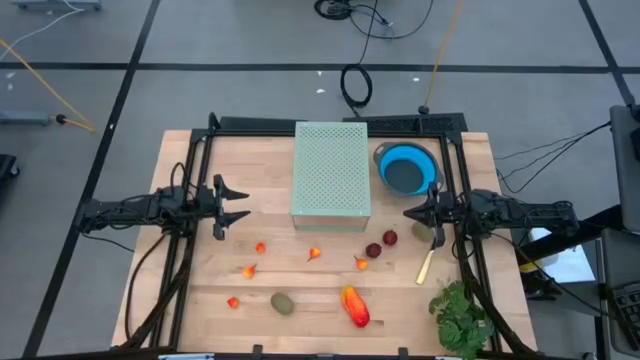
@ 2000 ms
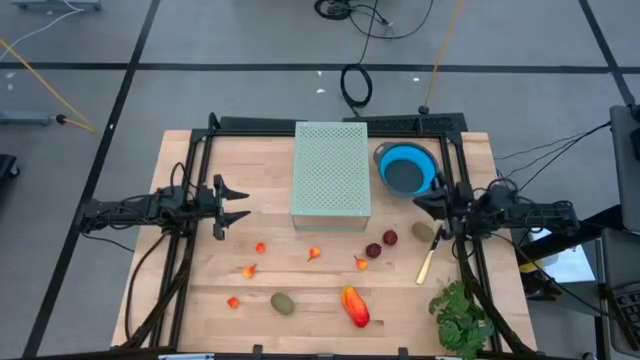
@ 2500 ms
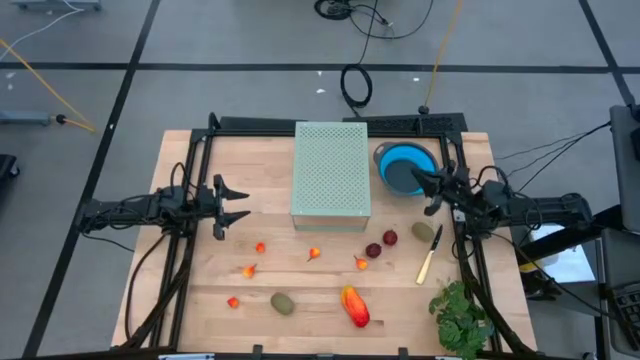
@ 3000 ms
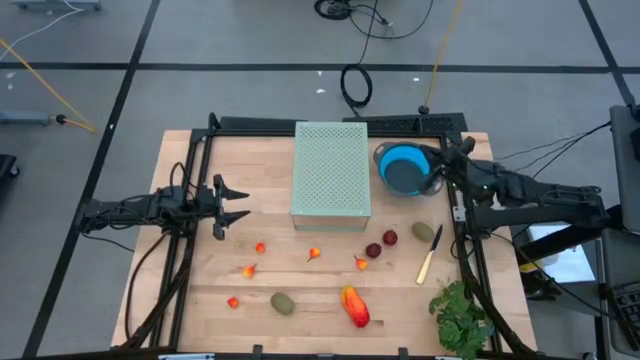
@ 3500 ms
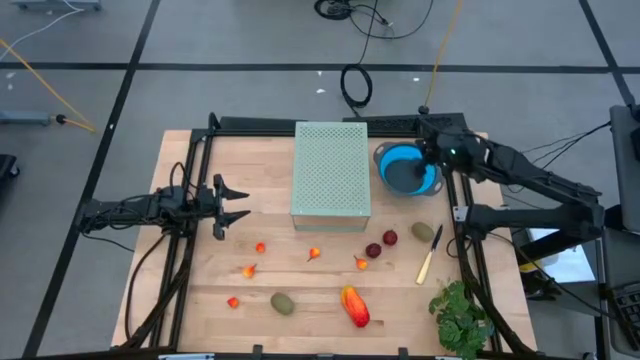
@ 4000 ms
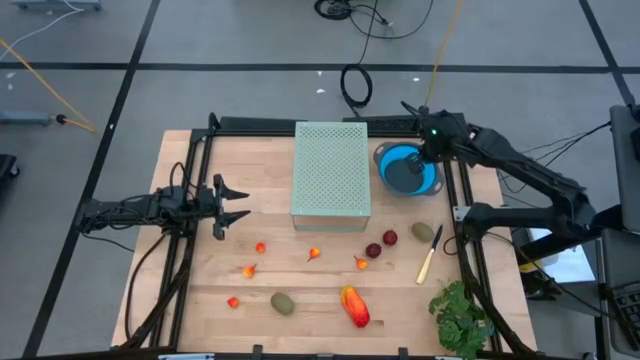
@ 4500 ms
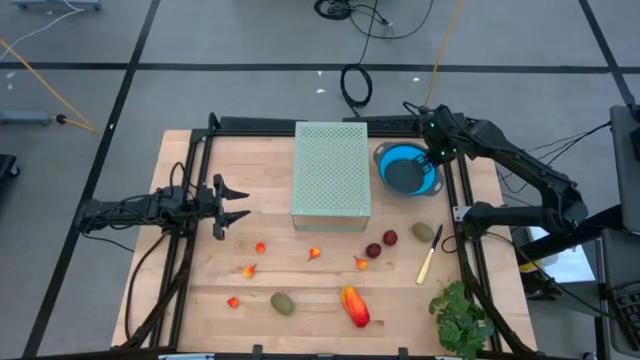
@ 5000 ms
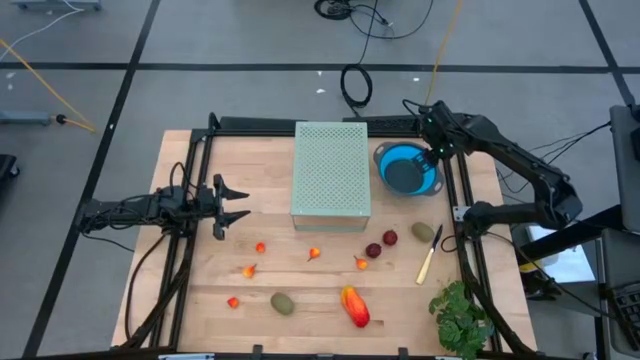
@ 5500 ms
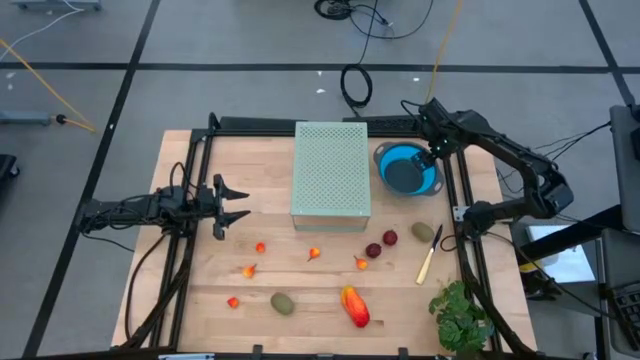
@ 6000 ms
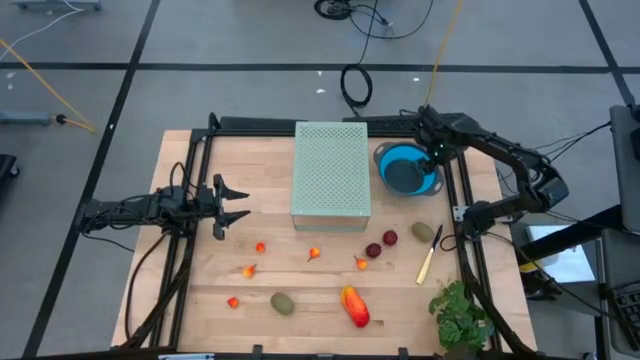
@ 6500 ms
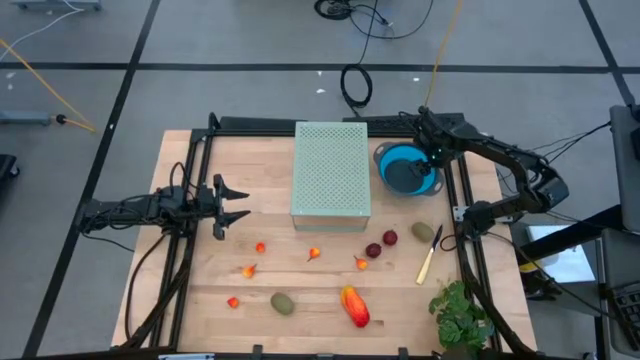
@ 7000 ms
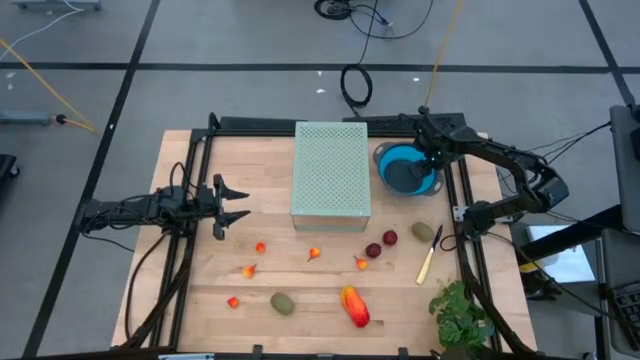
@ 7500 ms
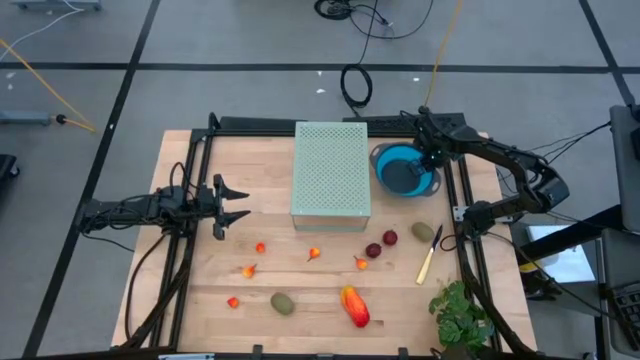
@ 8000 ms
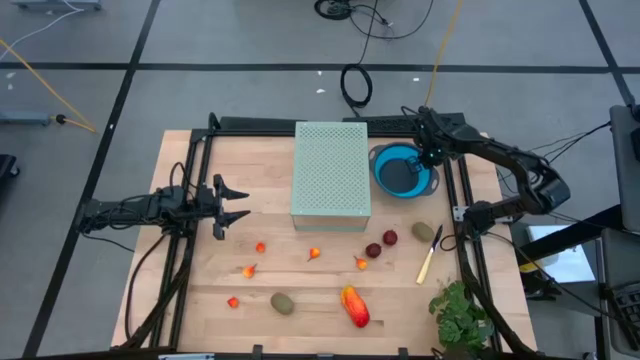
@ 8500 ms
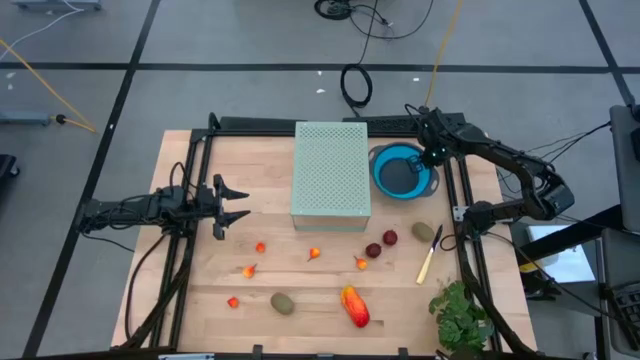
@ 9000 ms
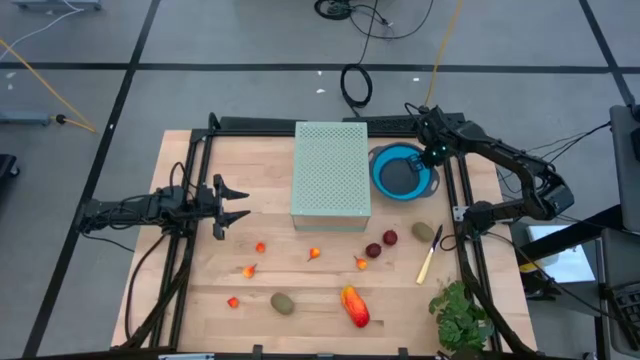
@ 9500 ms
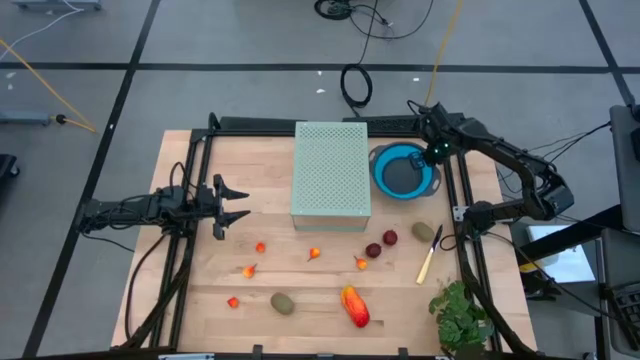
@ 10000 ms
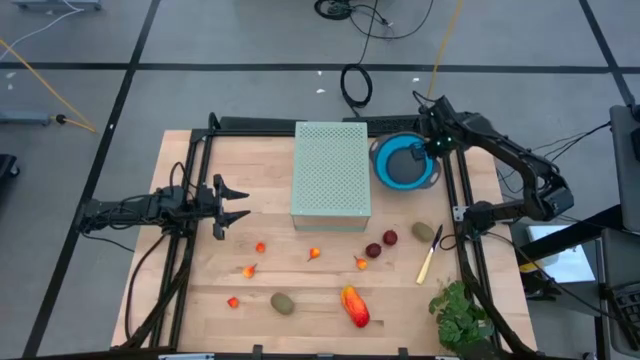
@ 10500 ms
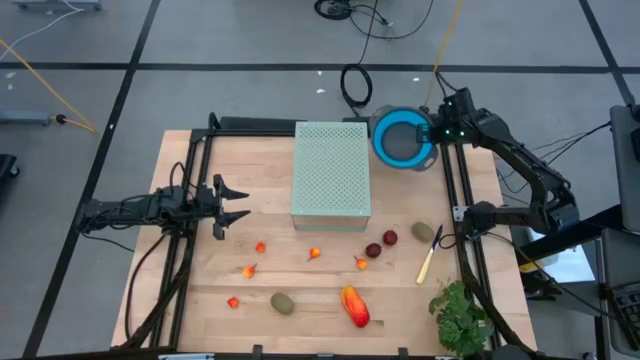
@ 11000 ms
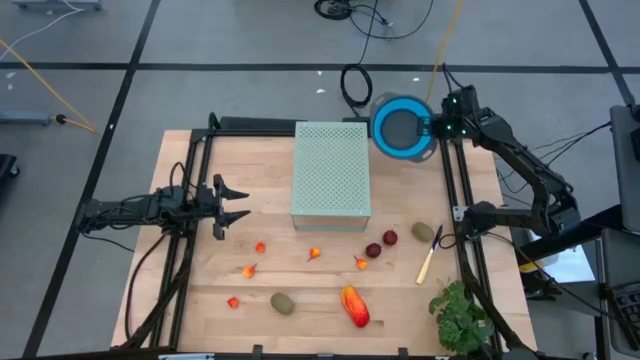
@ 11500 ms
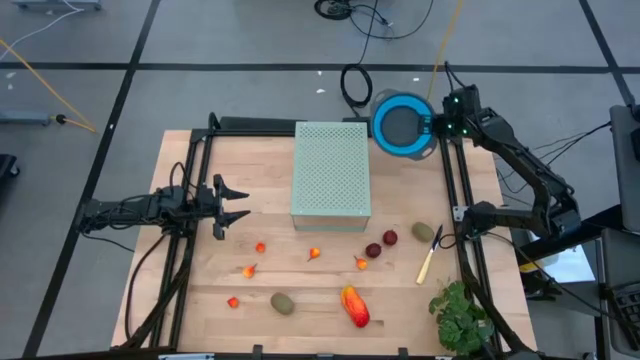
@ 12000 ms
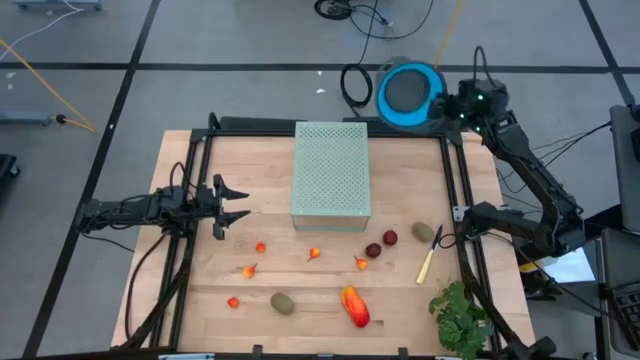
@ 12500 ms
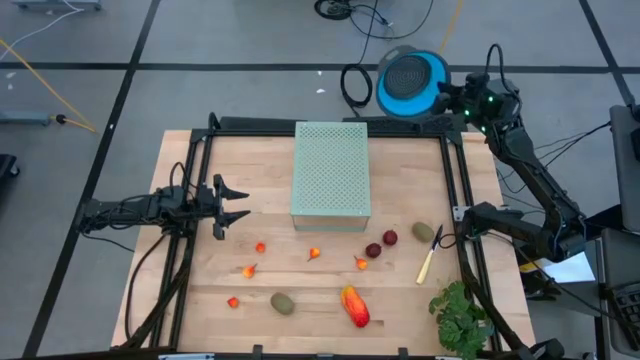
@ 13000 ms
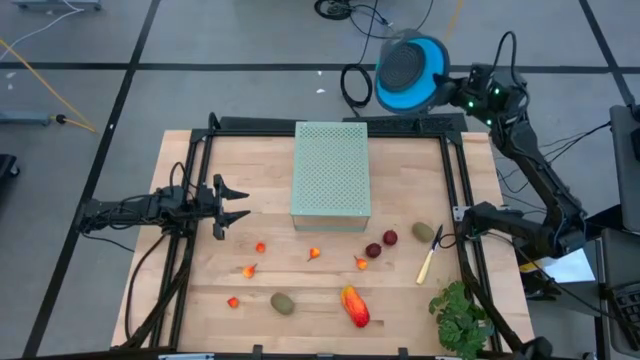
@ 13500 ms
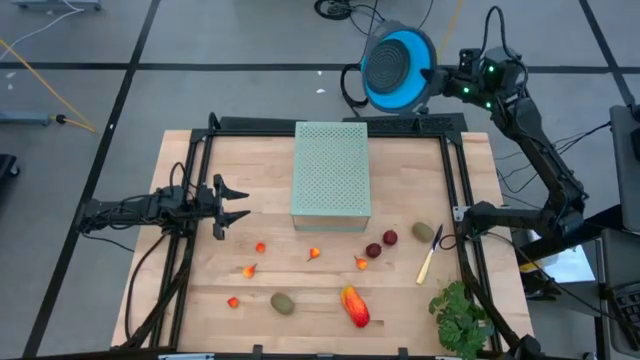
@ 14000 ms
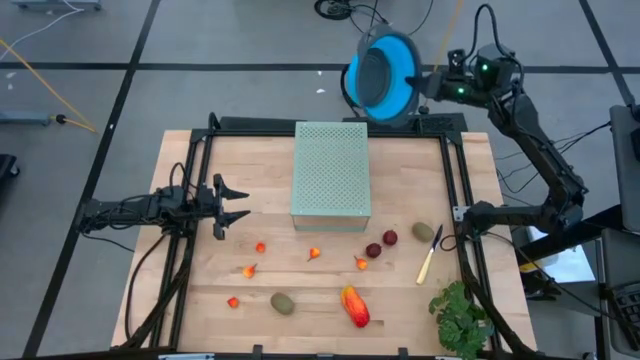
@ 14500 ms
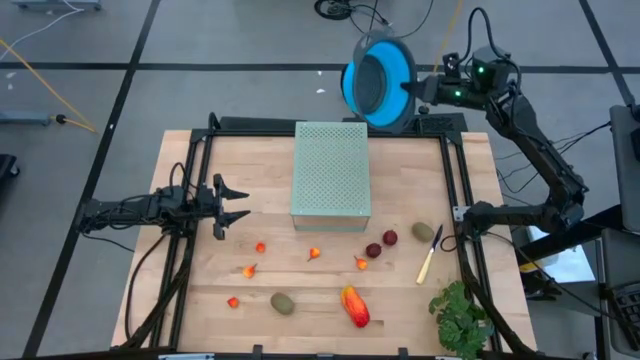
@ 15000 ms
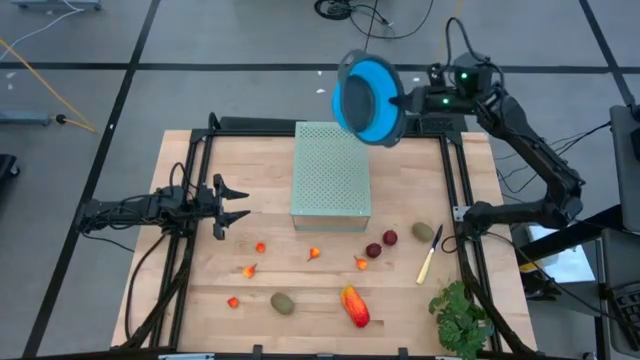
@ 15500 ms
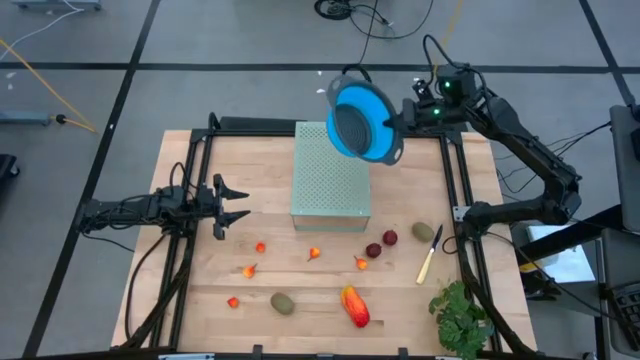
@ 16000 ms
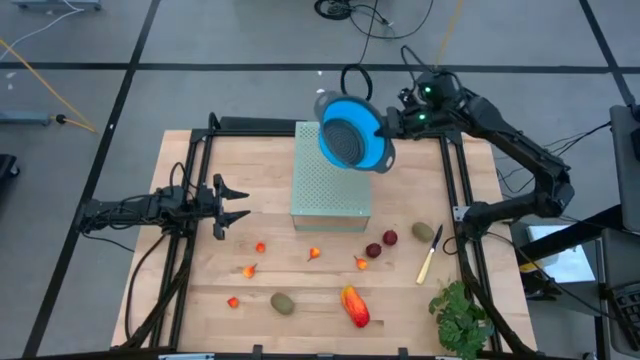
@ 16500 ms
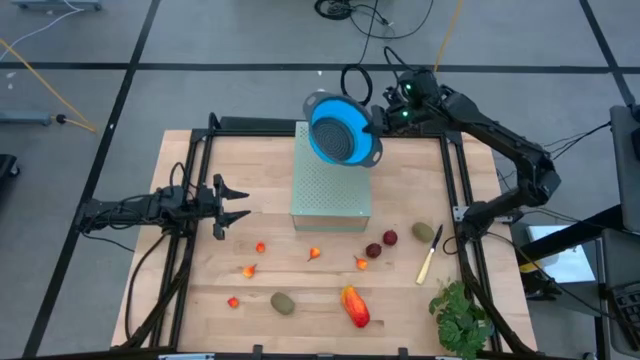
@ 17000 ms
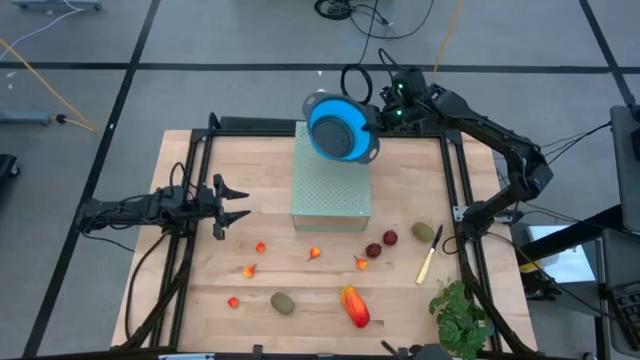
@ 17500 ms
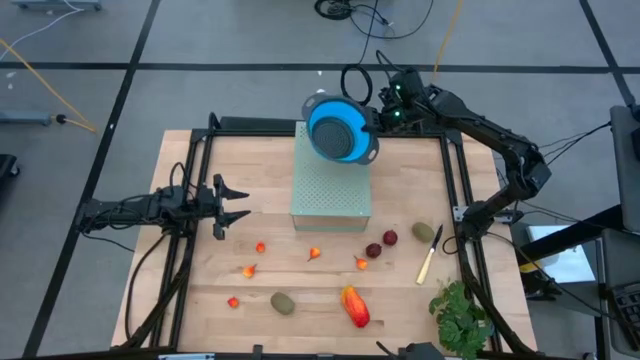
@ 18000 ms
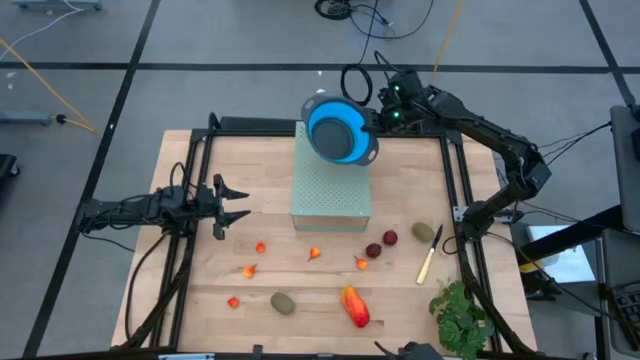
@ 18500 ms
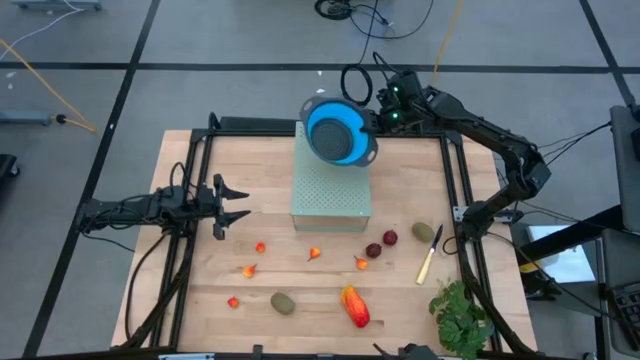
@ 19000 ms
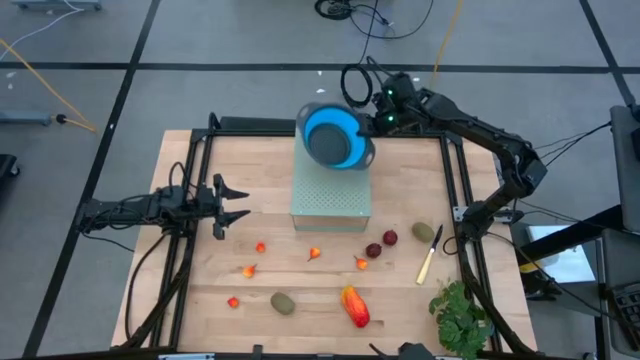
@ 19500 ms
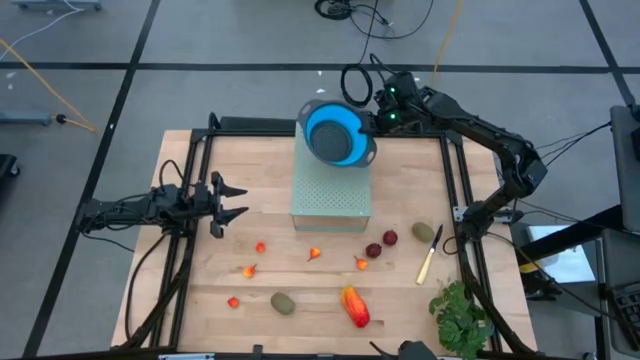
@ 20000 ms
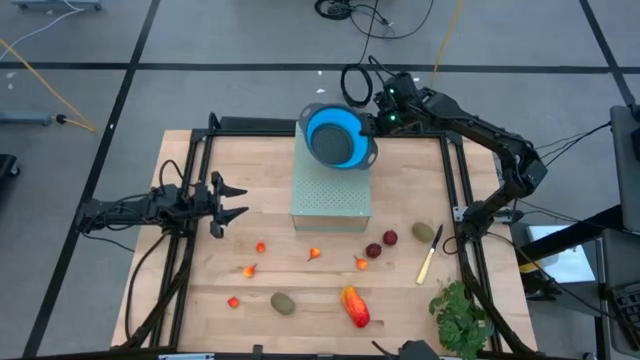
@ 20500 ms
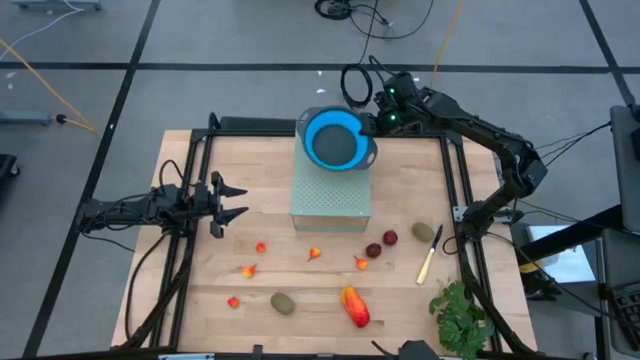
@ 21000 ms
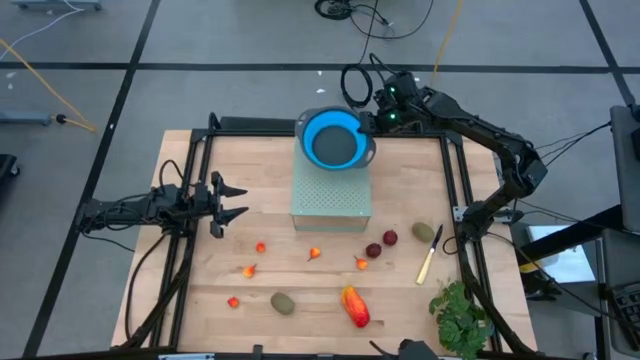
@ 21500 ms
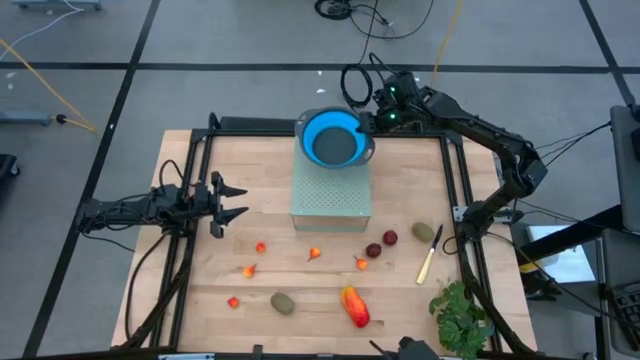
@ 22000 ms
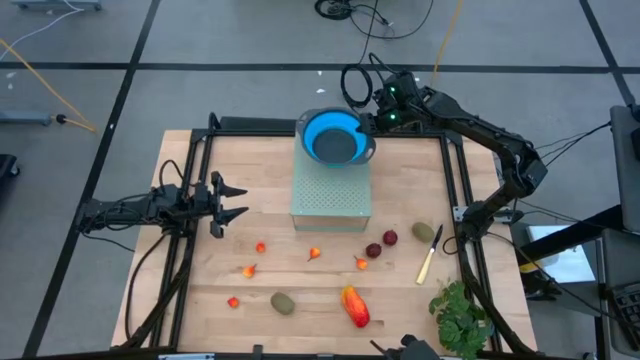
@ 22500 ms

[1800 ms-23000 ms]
Task: Pick & Place Fruit
Put the blue strainer bowl on the shelf
